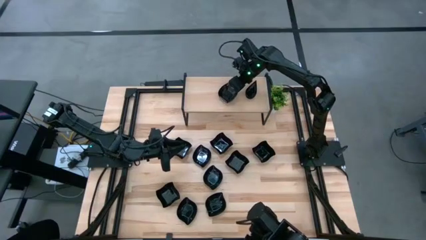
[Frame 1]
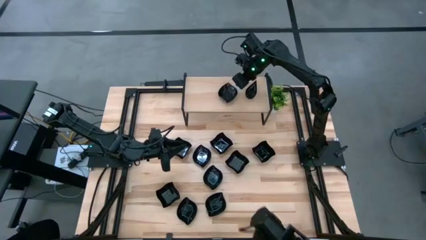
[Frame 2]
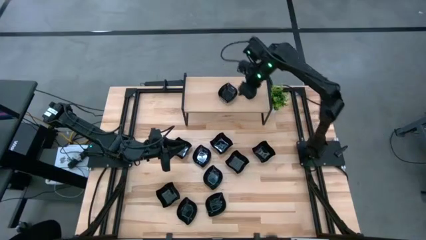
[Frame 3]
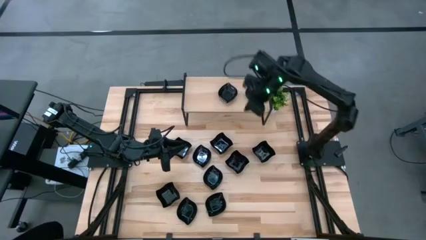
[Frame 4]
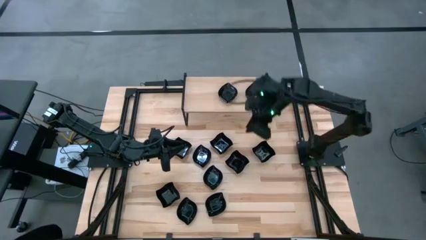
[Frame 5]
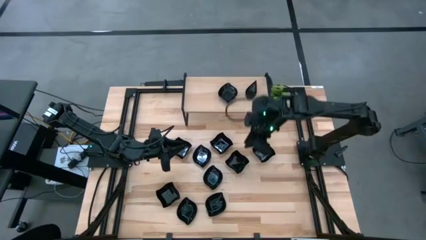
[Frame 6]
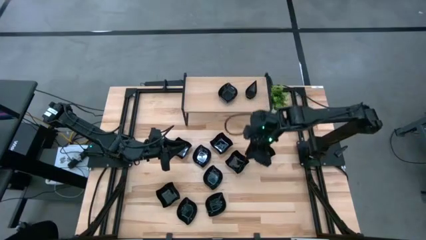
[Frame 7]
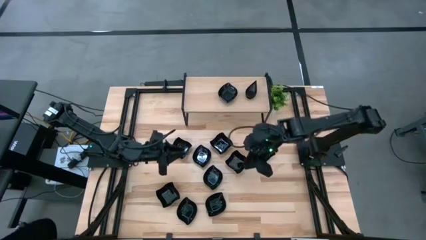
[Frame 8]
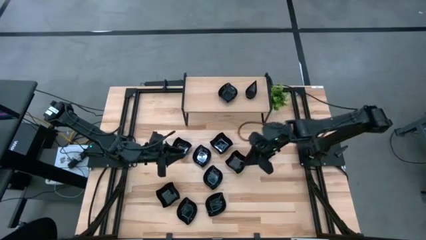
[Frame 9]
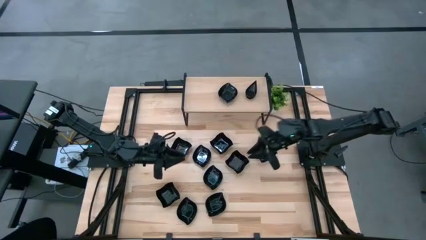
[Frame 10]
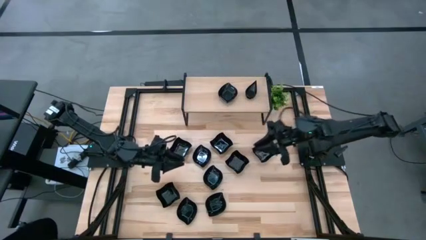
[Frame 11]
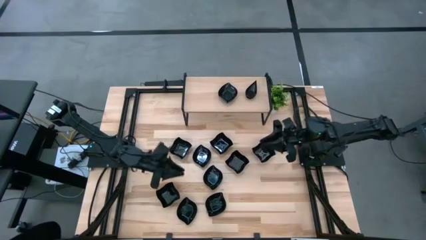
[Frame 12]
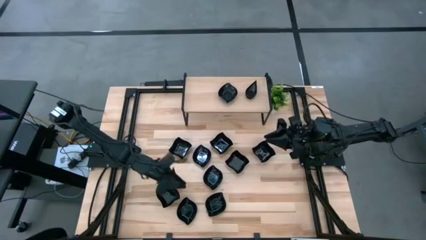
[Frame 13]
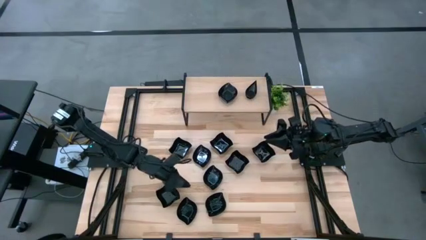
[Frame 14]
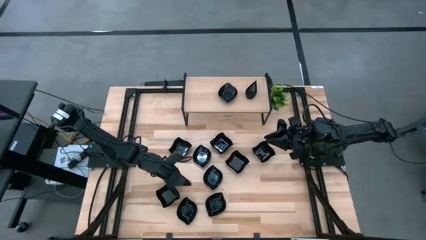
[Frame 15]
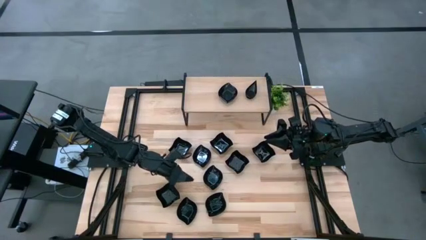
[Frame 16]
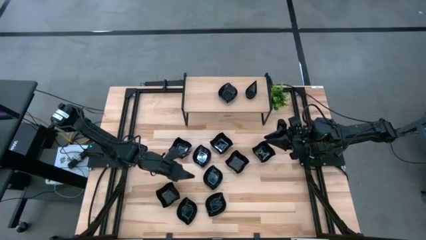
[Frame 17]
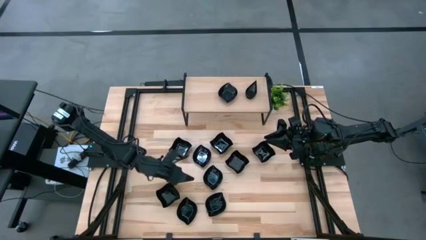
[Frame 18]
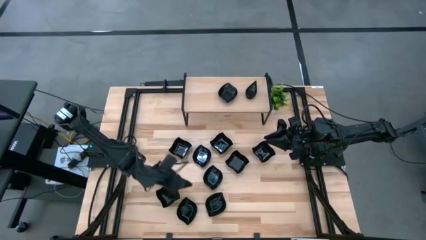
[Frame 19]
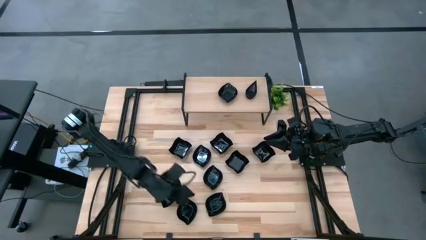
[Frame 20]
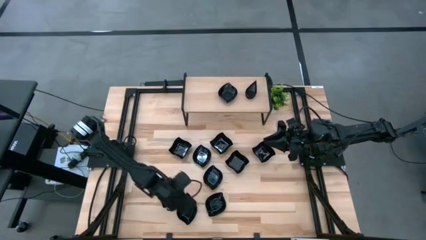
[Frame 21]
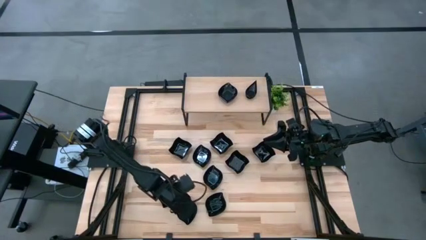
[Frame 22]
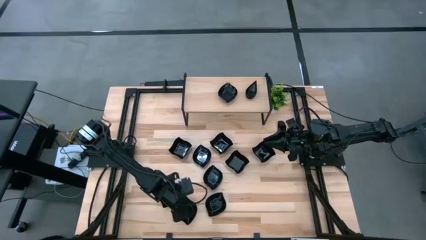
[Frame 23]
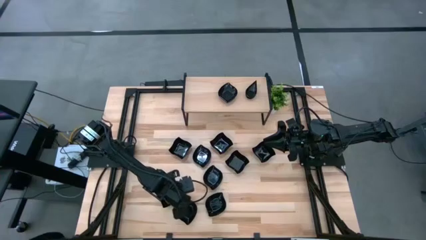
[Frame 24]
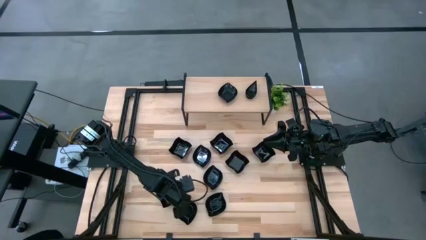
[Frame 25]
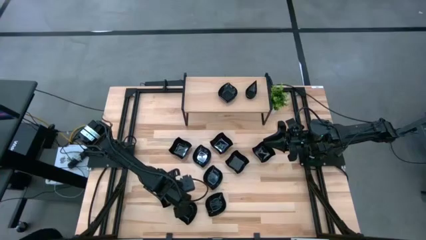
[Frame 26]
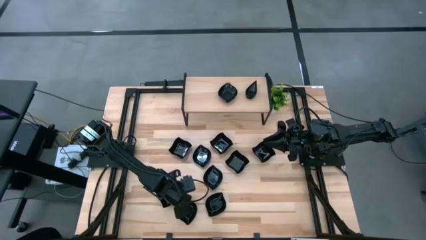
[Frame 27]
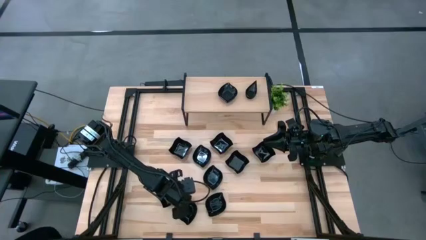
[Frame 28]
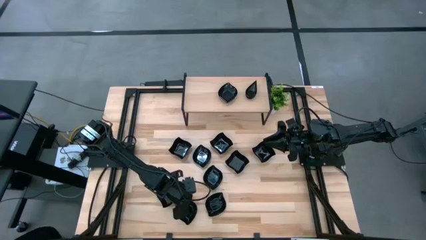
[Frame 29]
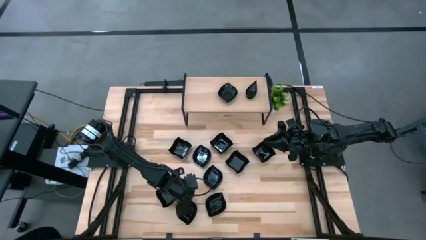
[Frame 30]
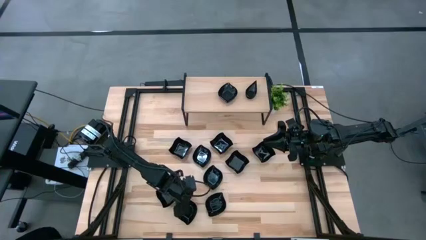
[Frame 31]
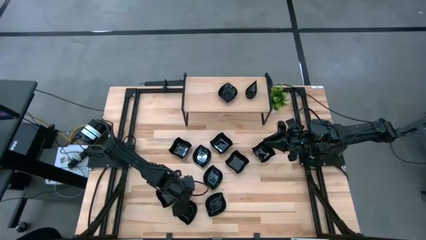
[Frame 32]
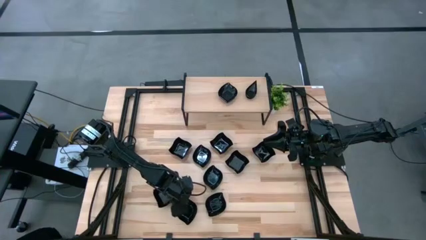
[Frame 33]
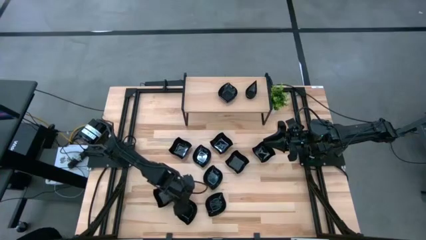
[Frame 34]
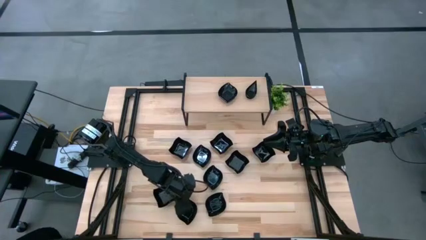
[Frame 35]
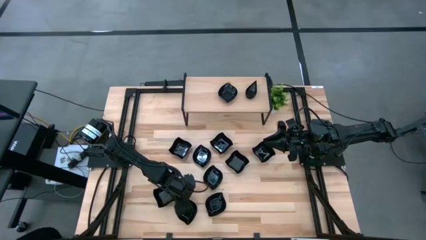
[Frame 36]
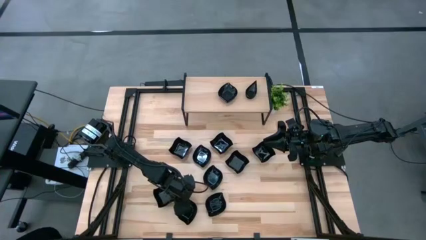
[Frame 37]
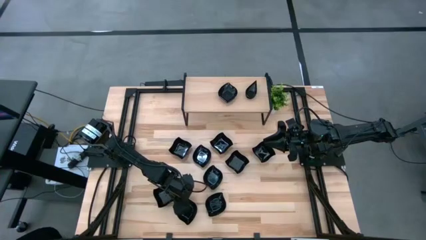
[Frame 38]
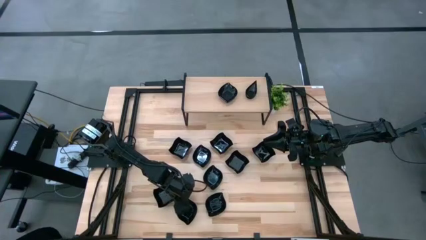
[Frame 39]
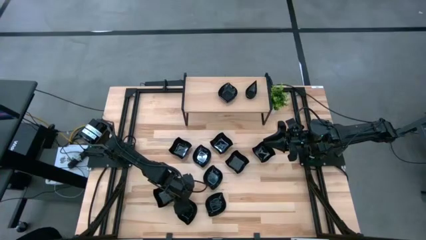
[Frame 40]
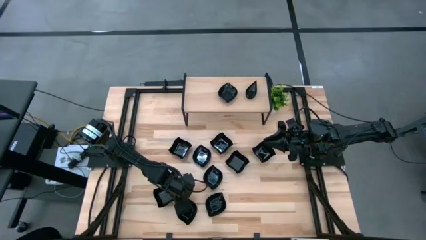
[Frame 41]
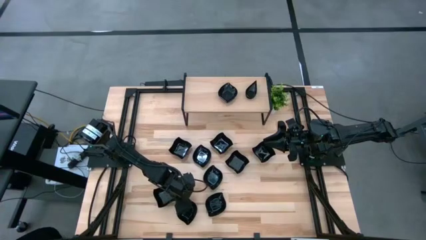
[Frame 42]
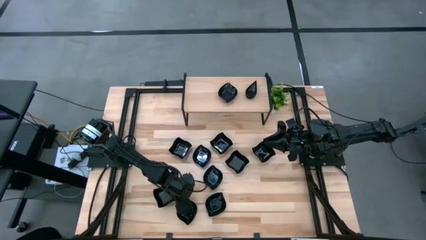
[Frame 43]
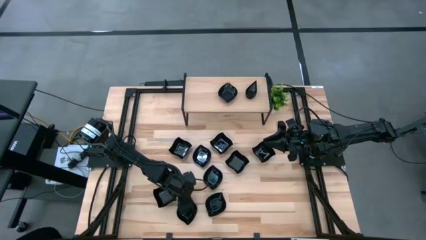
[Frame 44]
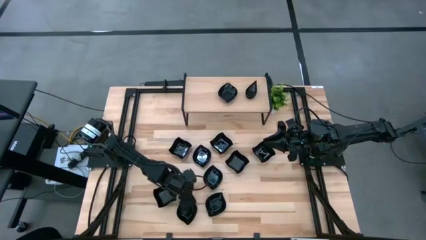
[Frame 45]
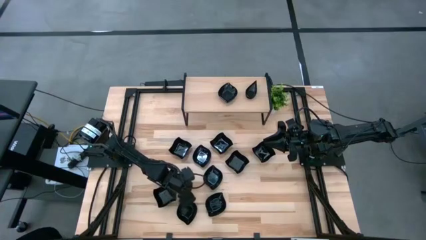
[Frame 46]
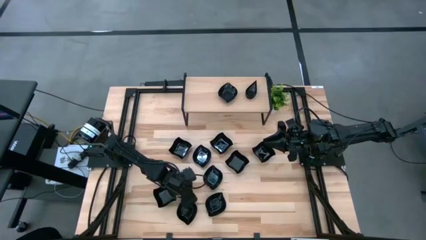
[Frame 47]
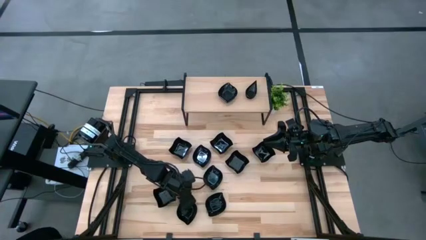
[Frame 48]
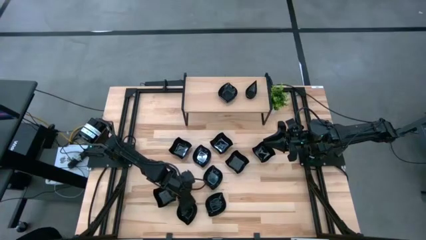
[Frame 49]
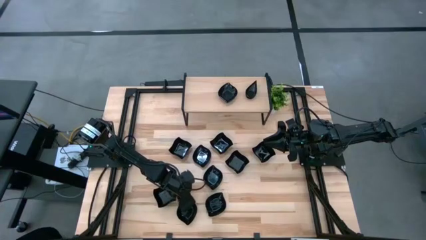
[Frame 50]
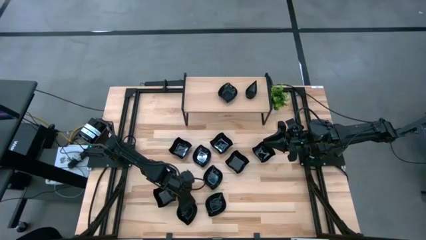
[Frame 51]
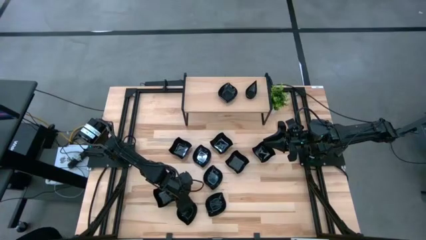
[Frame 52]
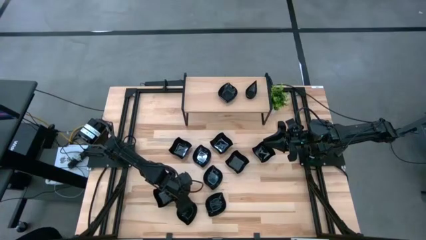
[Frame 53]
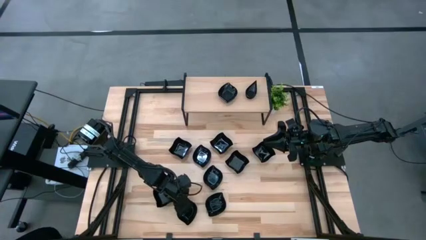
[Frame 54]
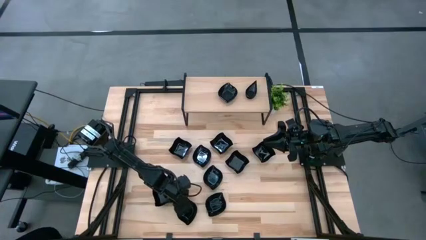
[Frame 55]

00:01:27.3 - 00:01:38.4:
Task: Pick & Place Mini shaped plates
Stack the black leaf shaped plate on top of the other black leaf shaped plate on the shelf

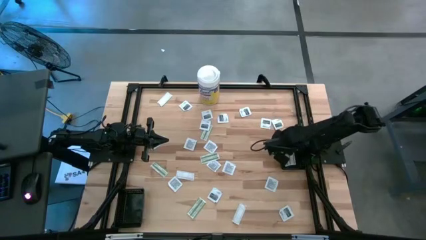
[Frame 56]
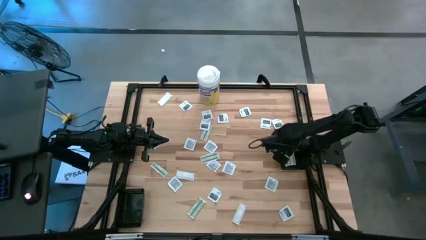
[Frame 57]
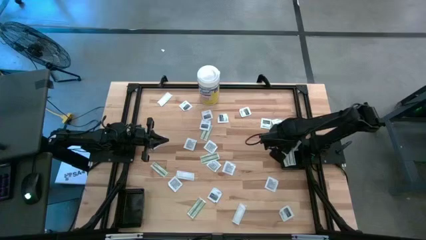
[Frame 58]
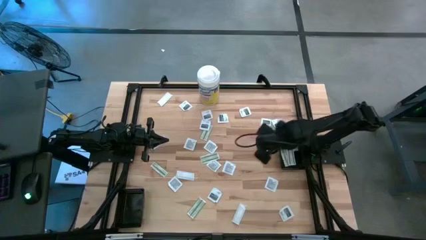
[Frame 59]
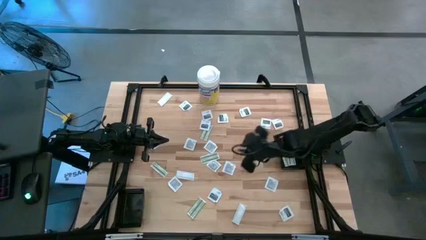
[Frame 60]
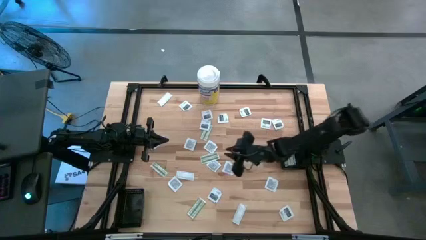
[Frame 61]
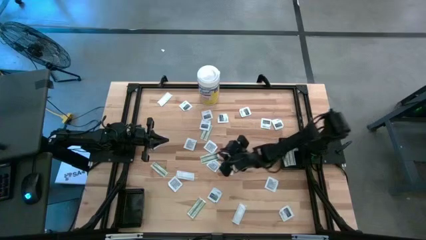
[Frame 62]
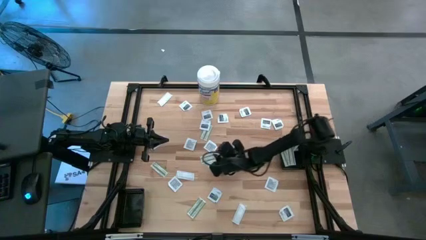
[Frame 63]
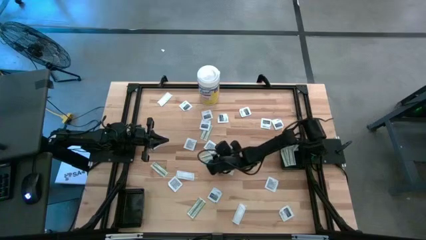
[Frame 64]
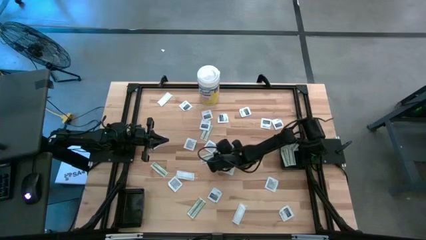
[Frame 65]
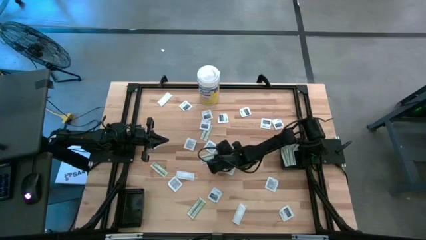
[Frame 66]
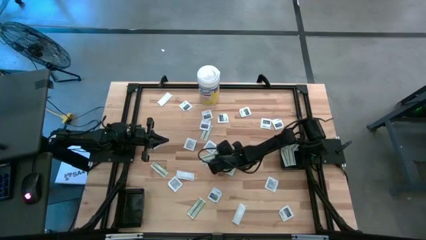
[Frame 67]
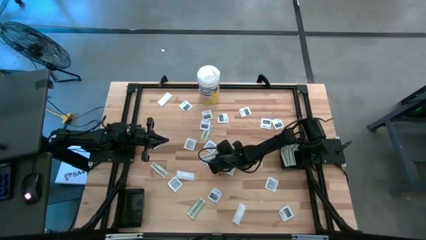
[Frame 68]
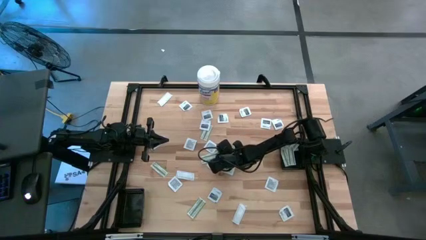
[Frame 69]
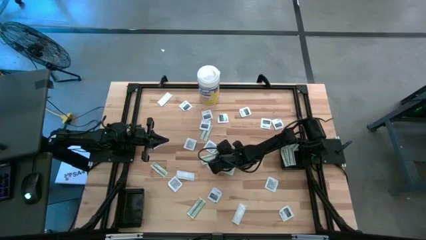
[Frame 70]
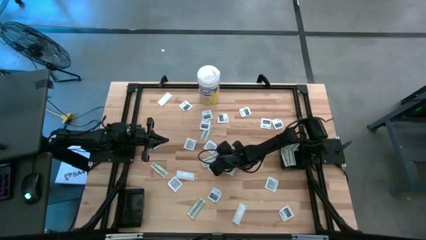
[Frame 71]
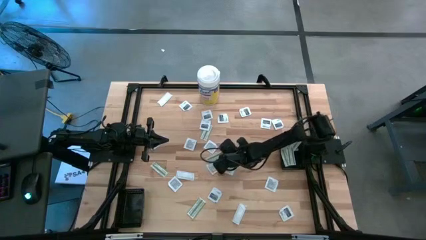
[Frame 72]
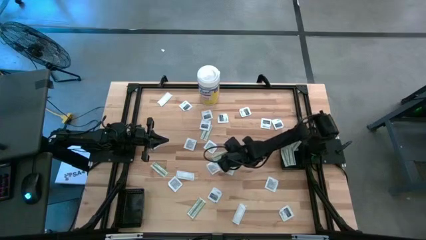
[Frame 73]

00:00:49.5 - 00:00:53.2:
Task: Pick & Place First Aid Supplies
Put the white bandage pad into the right black bin

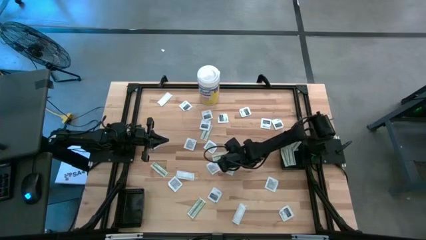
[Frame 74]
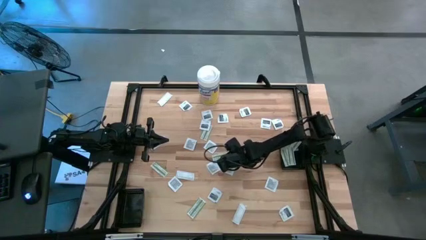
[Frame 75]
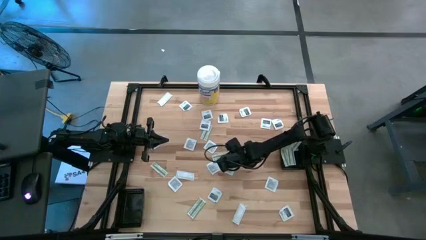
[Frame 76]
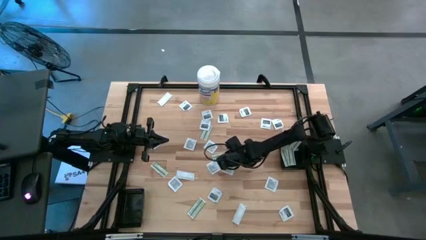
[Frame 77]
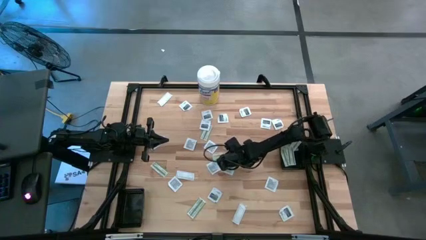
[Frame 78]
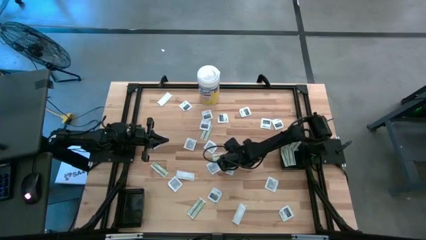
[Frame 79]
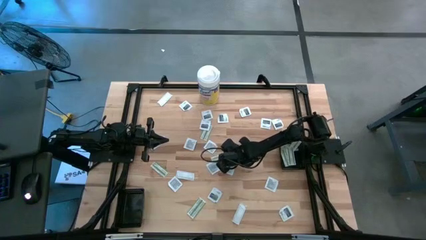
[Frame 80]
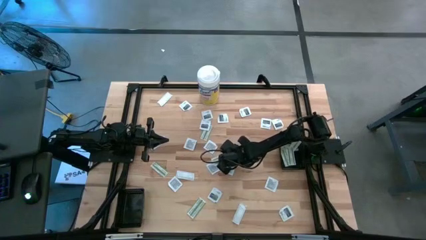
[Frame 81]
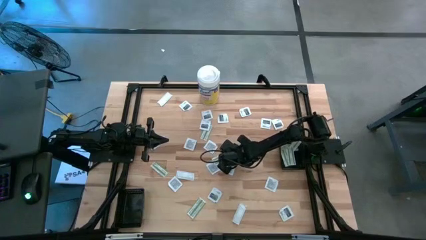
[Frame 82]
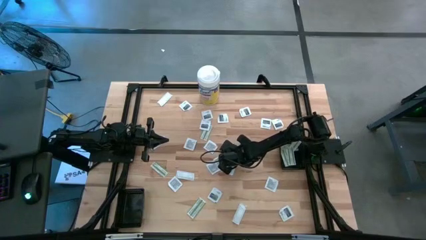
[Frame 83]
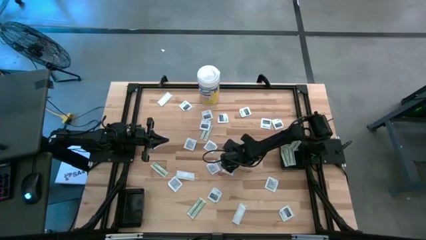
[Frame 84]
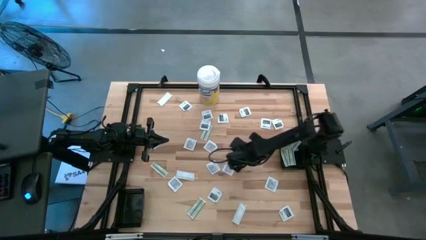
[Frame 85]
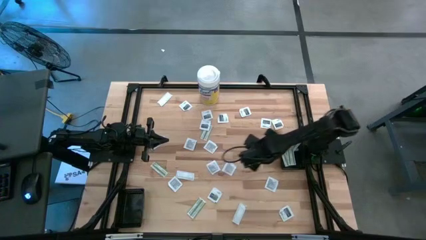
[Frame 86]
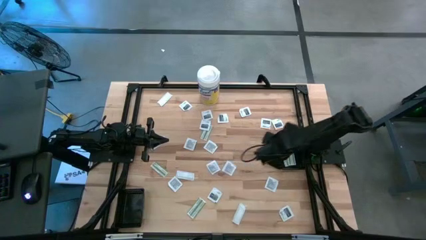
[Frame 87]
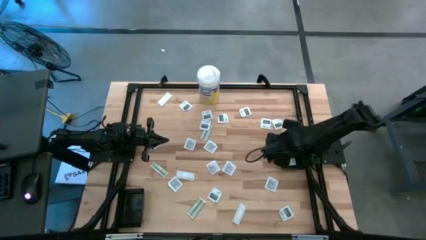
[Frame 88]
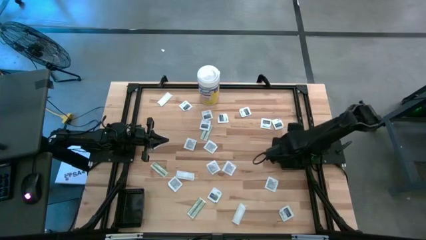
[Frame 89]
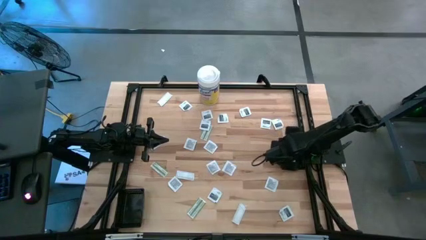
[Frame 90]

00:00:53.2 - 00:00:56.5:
Put the white bandage pad into the right black bin
